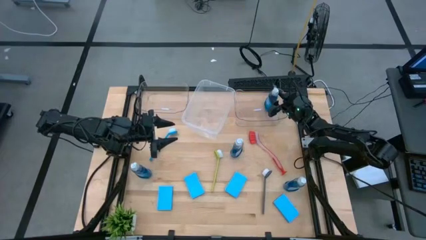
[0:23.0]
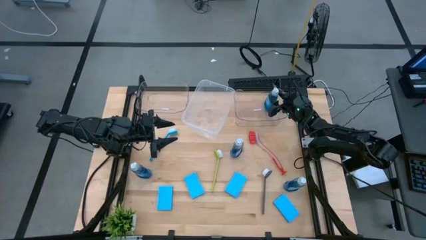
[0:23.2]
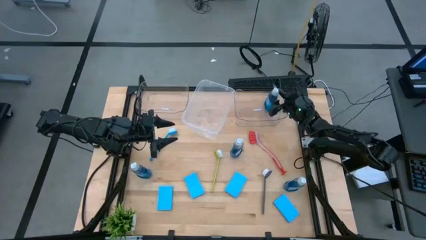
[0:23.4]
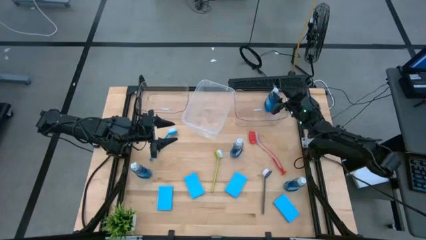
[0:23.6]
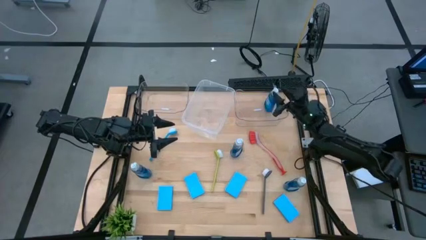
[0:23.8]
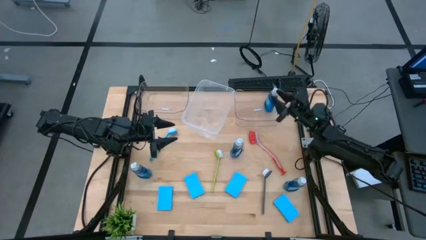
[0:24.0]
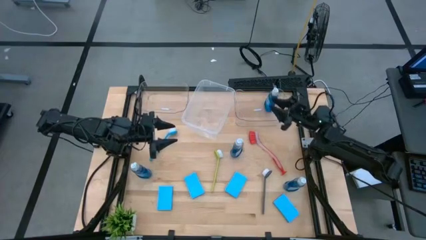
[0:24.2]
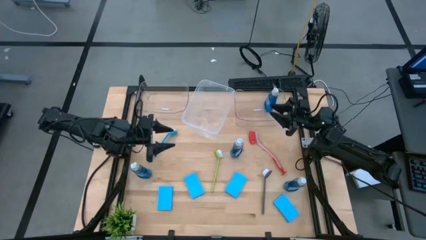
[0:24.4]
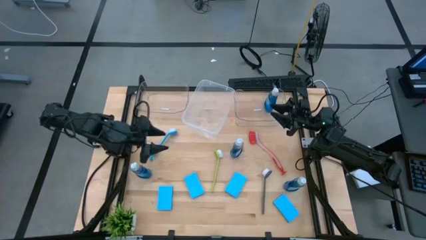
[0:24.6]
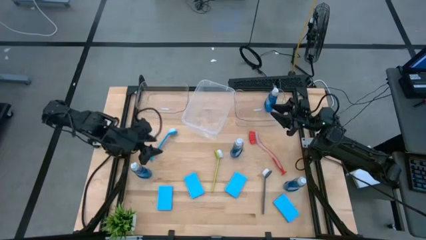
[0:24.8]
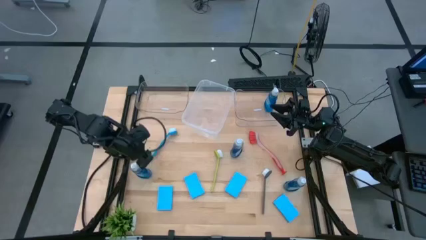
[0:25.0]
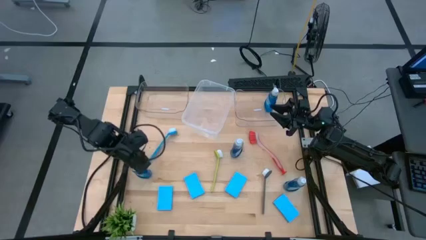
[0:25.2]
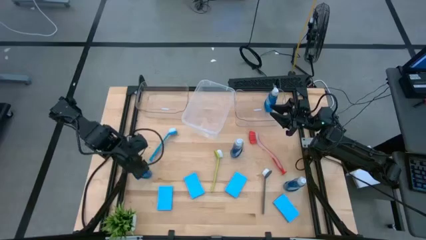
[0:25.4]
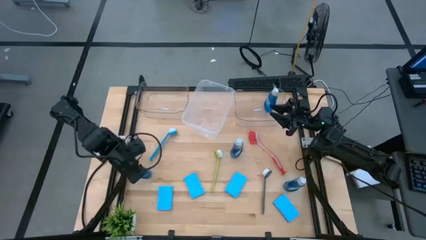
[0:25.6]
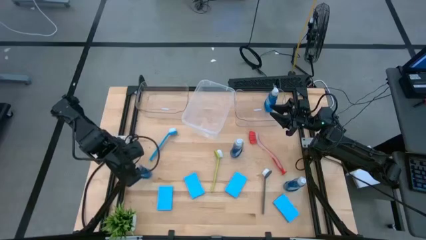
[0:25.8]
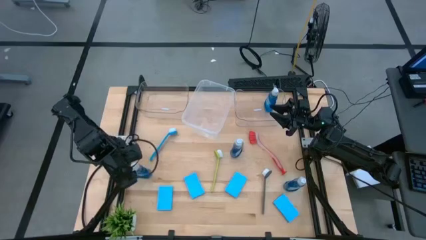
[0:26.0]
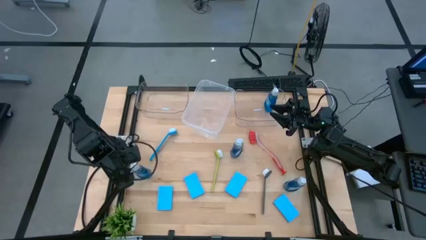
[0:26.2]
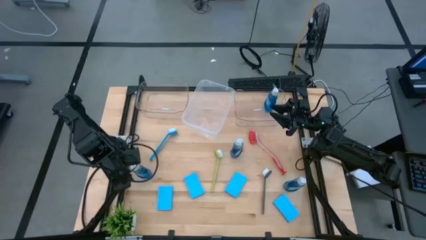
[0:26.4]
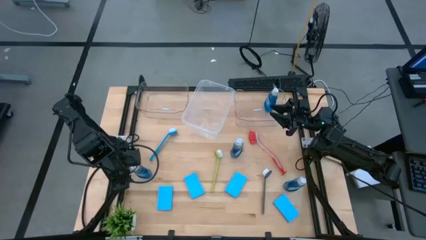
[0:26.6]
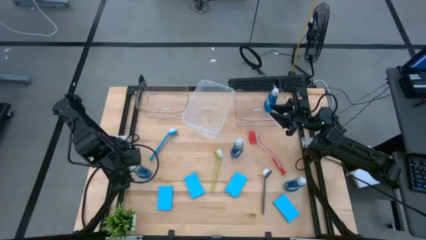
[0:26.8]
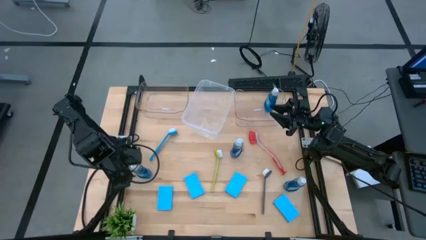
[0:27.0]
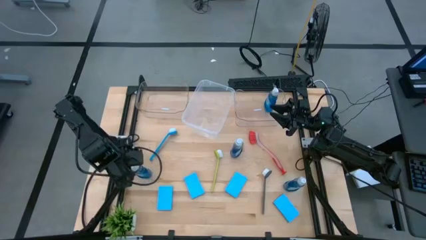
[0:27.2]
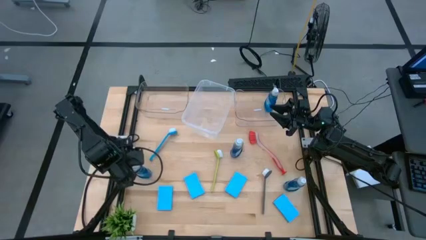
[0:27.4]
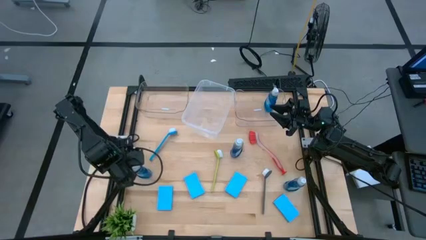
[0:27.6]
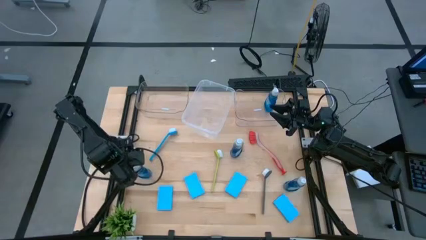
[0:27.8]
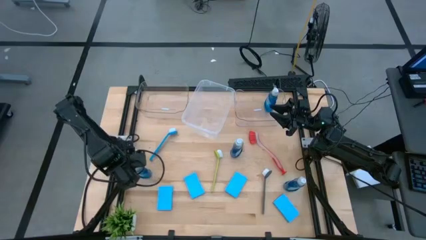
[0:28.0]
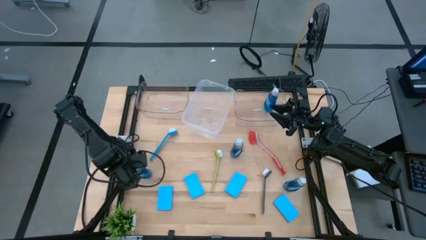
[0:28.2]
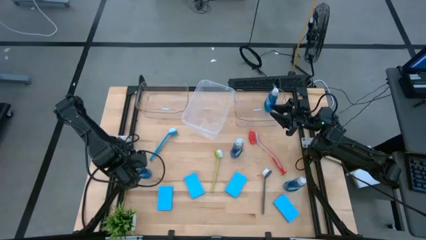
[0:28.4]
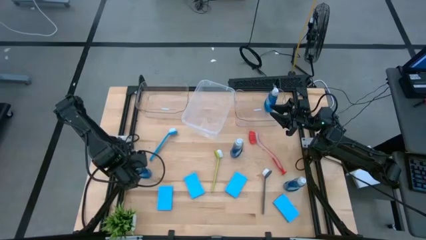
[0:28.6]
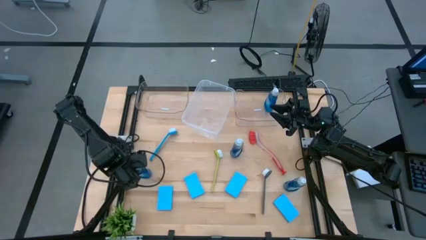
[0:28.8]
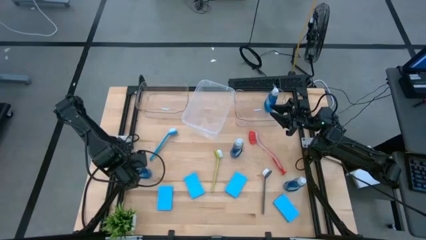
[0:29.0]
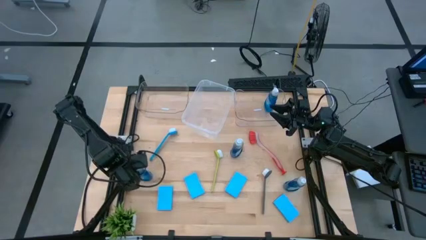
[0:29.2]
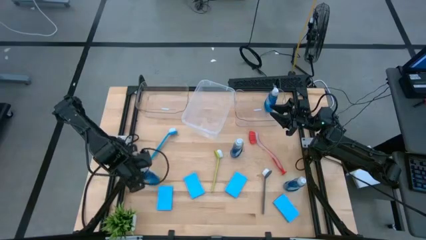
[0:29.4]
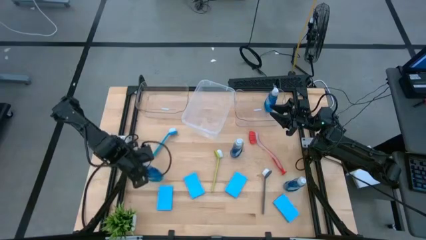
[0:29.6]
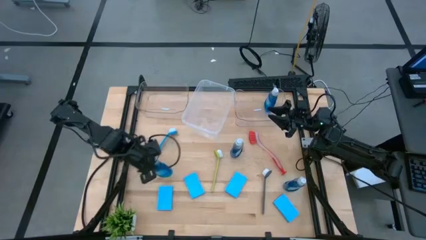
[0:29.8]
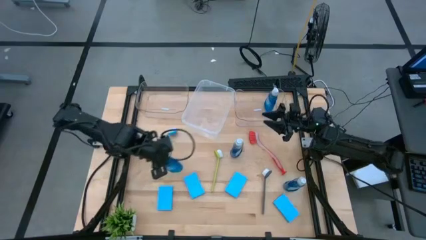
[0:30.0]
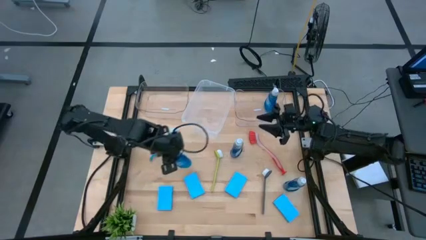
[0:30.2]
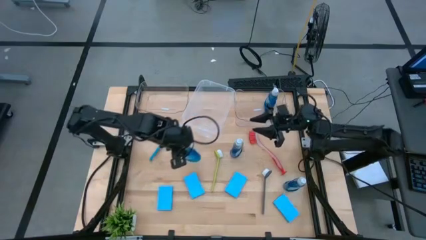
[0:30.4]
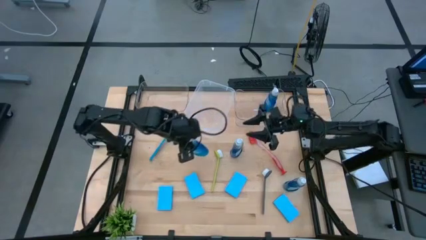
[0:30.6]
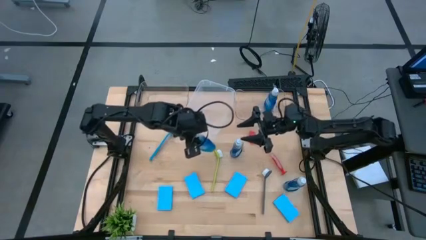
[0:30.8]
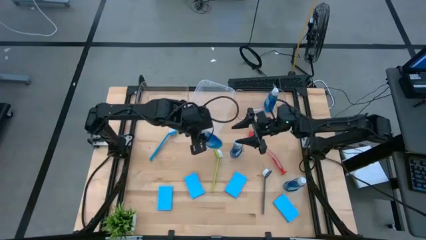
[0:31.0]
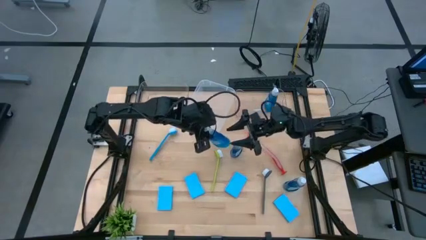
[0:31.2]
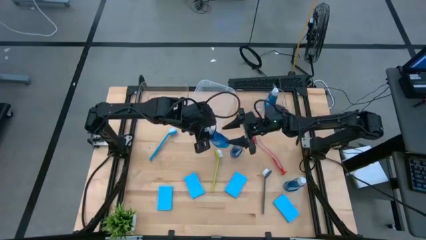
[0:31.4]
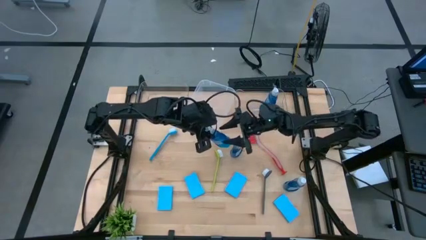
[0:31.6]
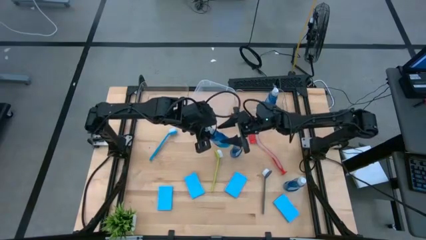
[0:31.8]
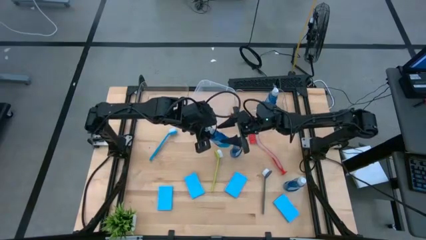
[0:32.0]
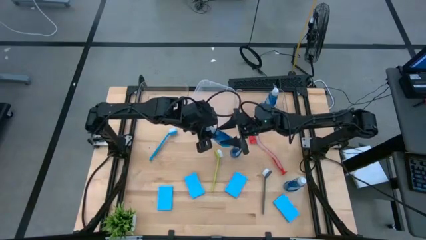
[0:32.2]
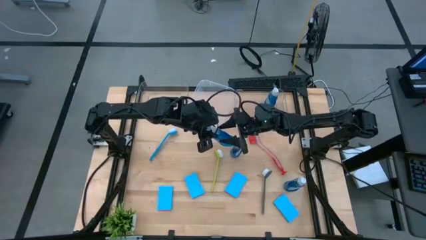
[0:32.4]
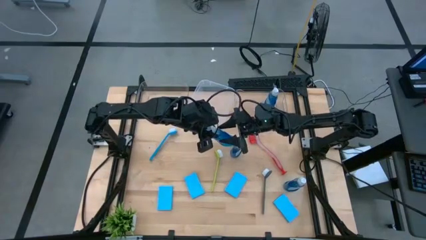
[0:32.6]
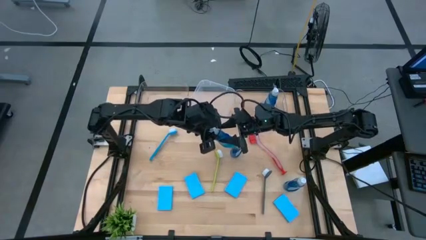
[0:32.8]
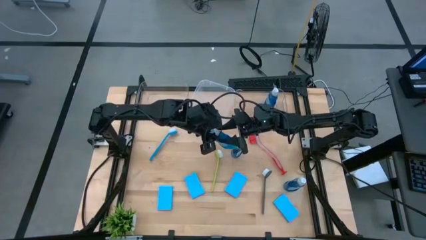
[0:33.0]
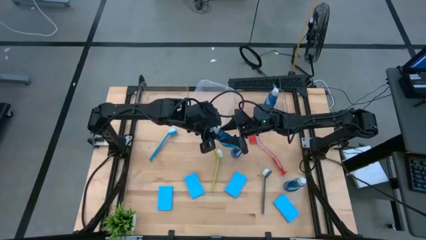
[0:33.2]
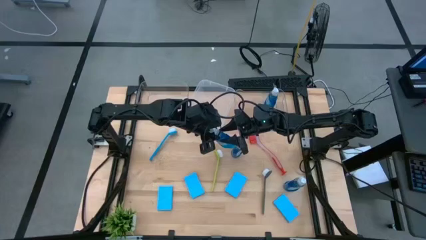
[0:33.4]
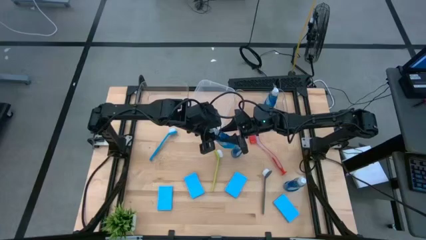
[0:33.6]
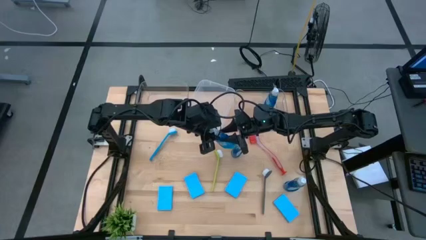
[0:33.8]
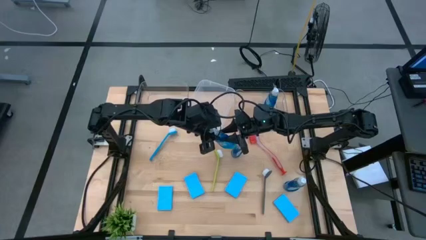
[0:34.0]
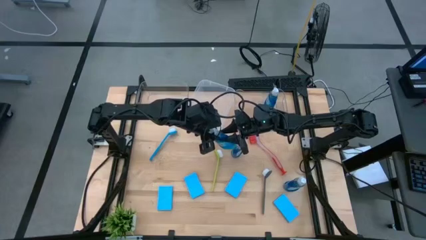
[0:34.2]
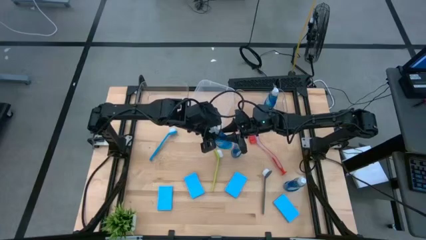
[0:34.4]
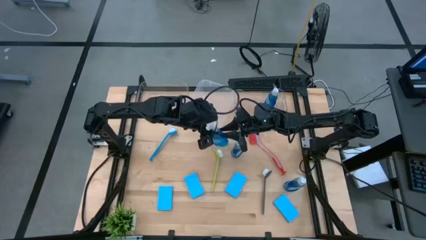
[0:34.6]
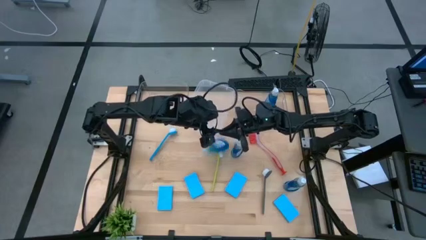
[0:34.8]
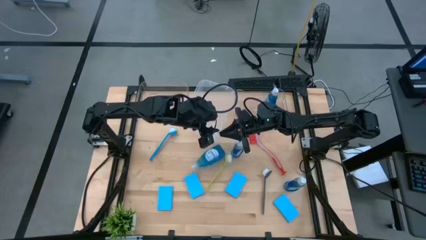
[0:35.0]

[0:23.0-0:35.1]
Task: Pick & Place Kitchen Sink Supplies
Put the blue soap dispenser into the right transparent bin
